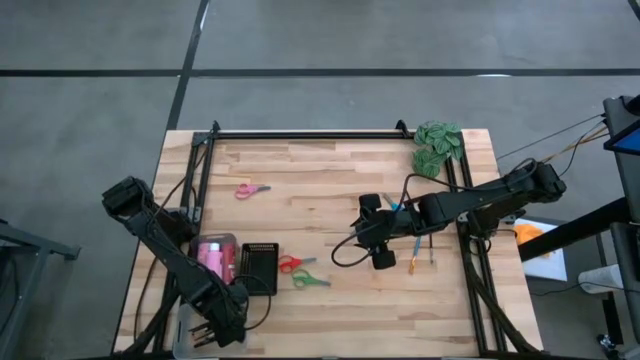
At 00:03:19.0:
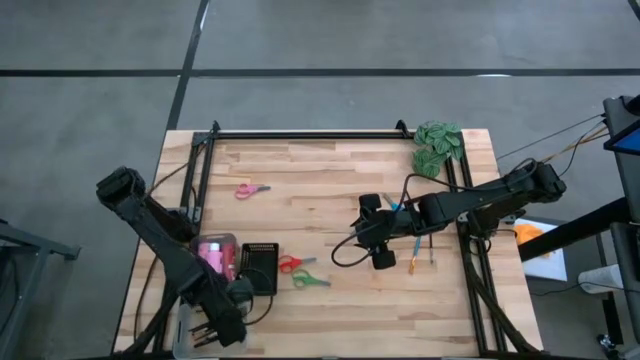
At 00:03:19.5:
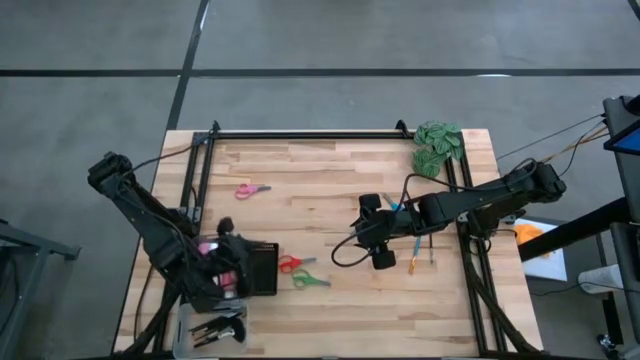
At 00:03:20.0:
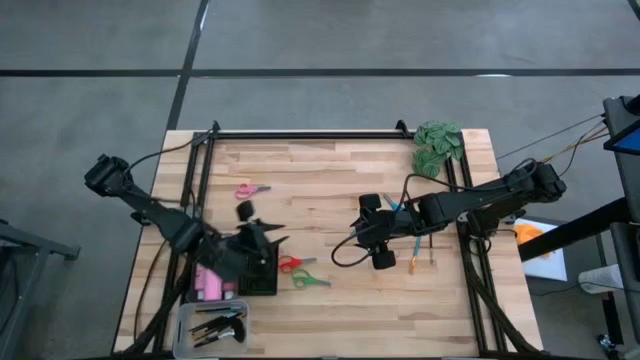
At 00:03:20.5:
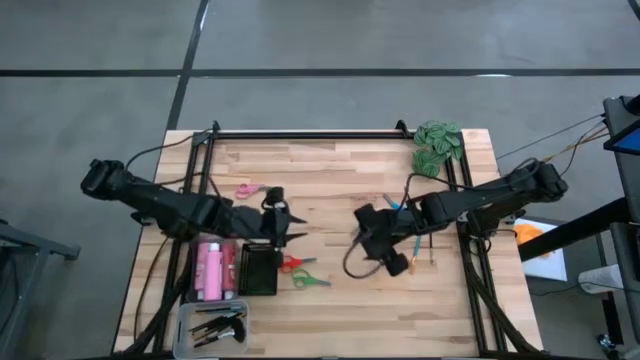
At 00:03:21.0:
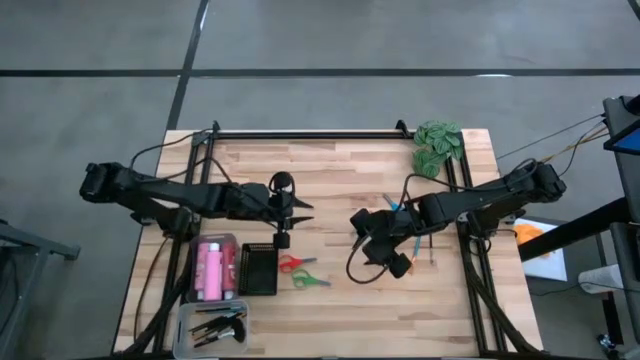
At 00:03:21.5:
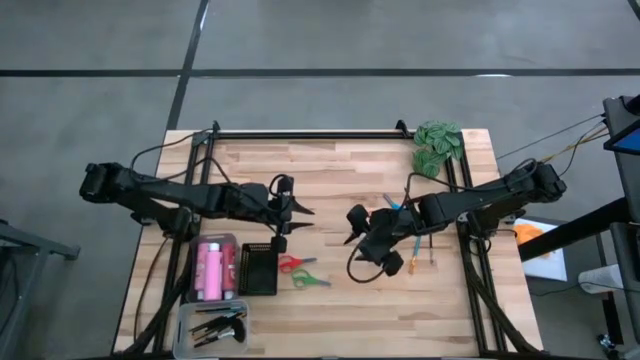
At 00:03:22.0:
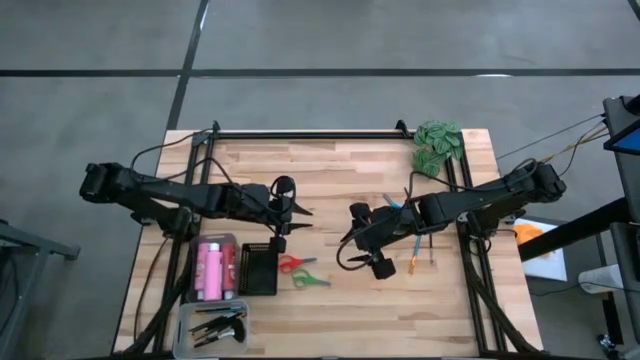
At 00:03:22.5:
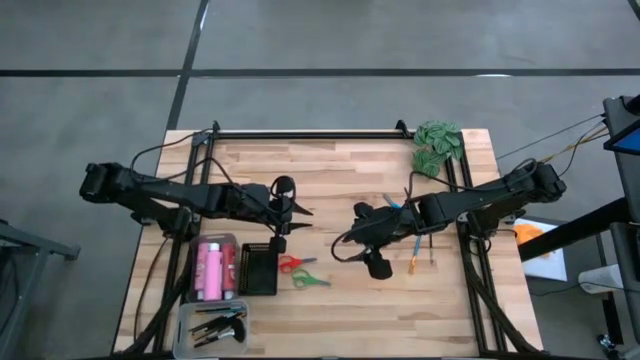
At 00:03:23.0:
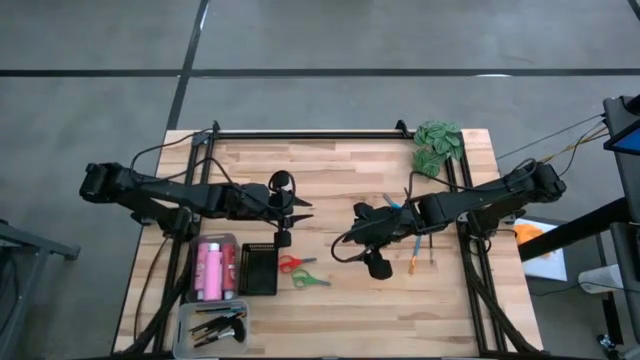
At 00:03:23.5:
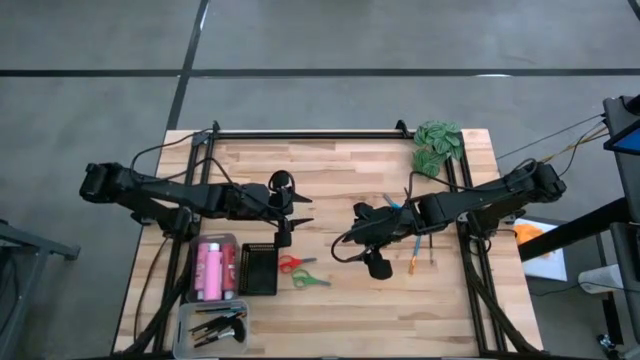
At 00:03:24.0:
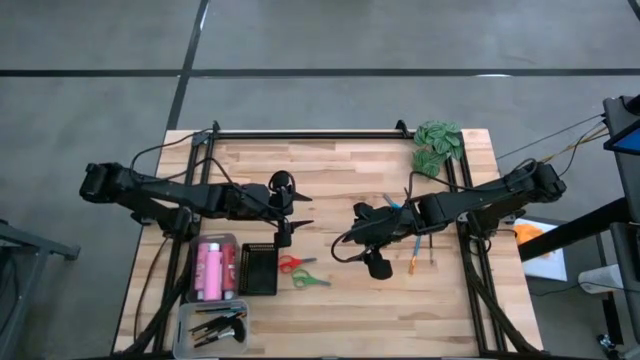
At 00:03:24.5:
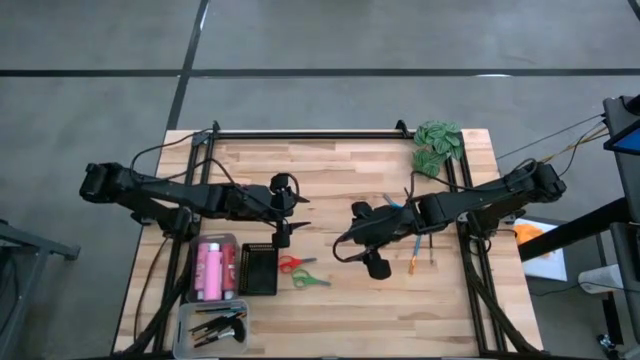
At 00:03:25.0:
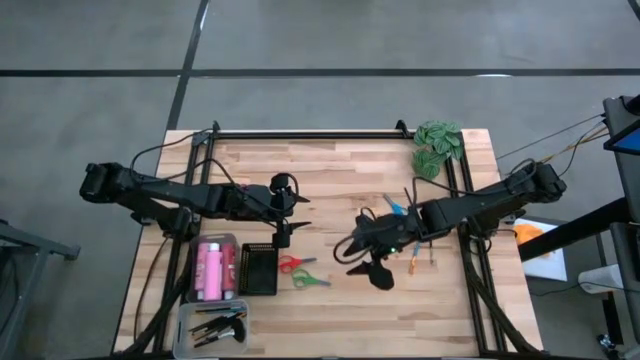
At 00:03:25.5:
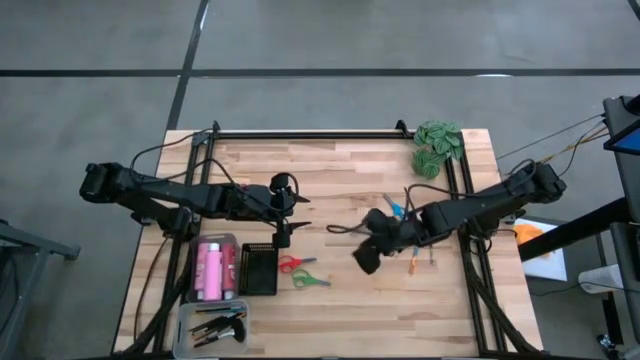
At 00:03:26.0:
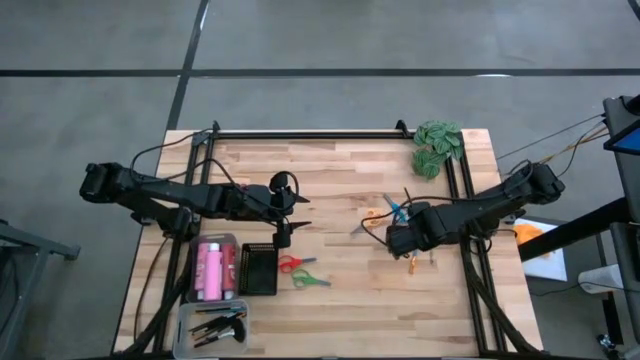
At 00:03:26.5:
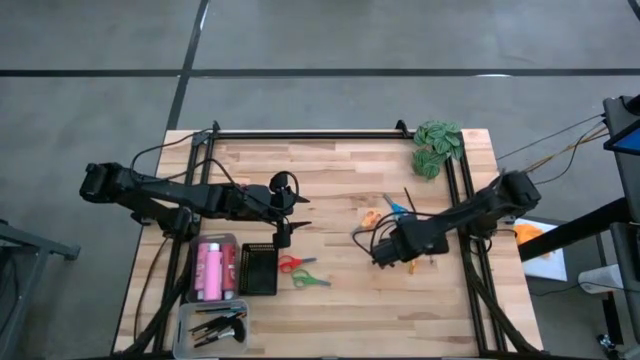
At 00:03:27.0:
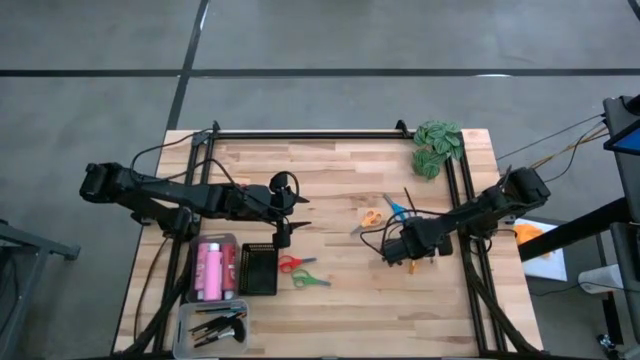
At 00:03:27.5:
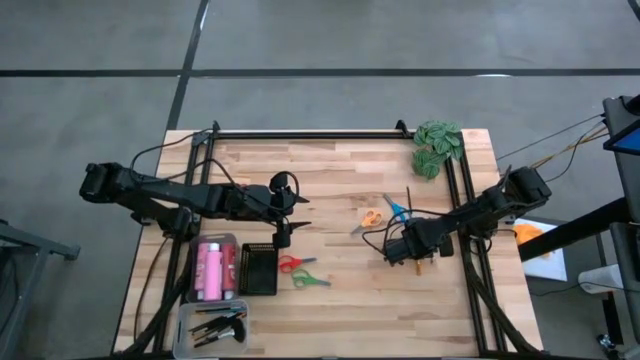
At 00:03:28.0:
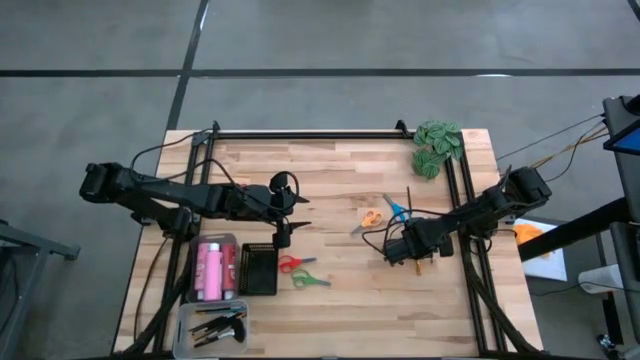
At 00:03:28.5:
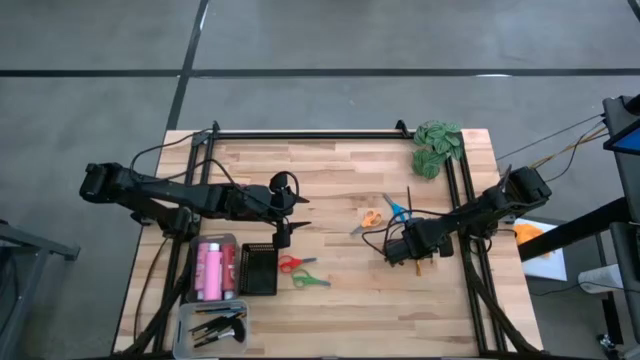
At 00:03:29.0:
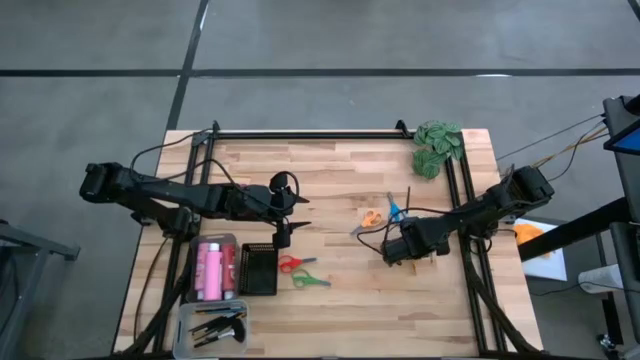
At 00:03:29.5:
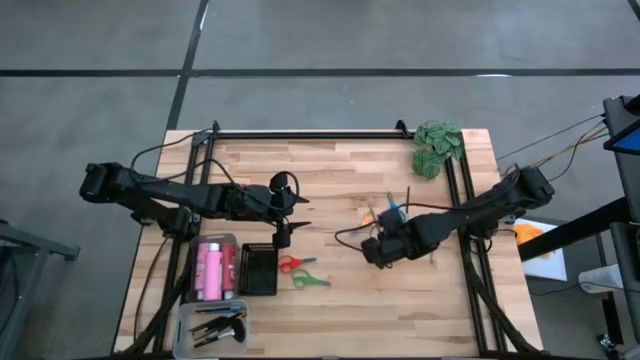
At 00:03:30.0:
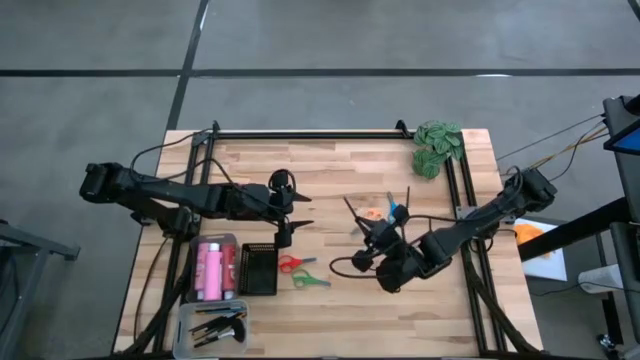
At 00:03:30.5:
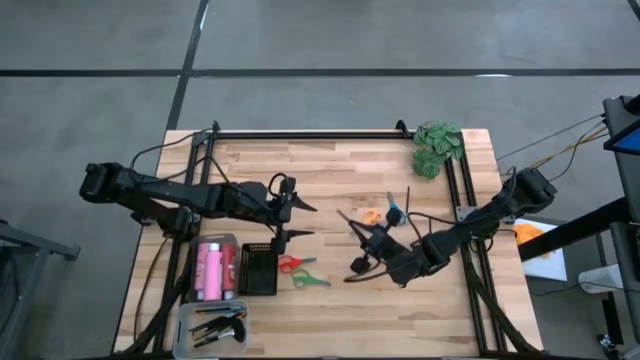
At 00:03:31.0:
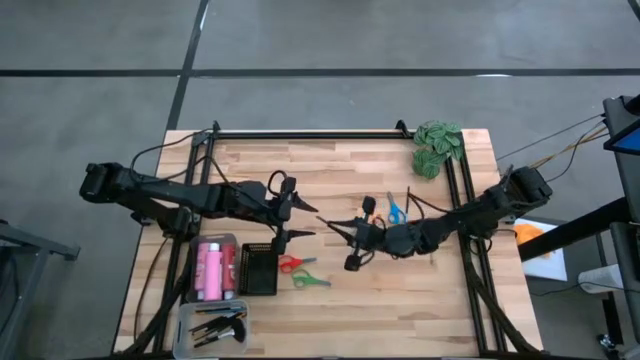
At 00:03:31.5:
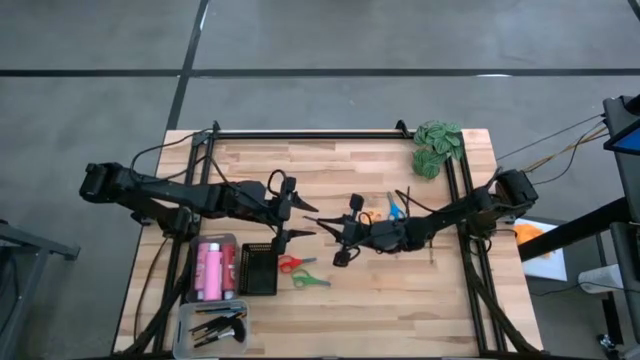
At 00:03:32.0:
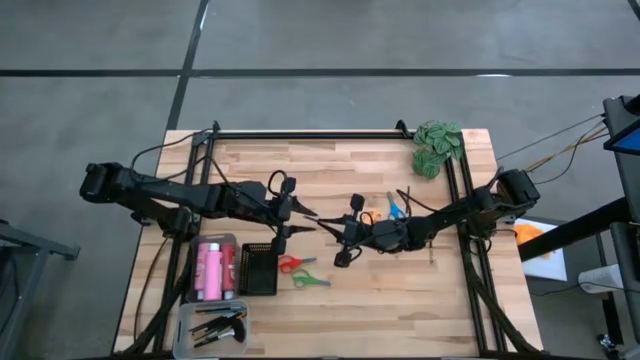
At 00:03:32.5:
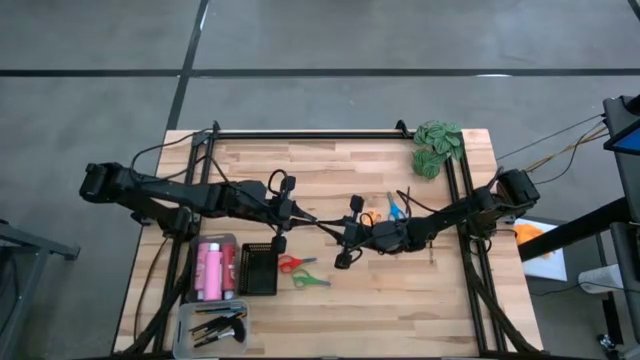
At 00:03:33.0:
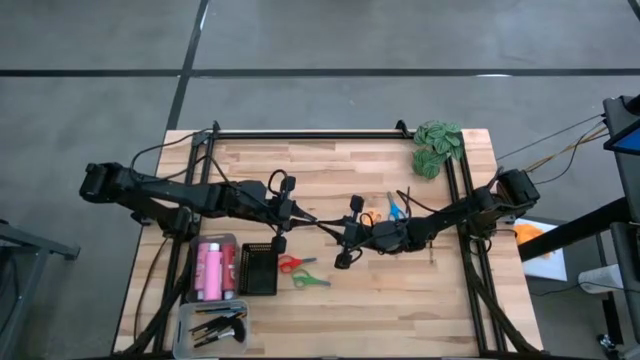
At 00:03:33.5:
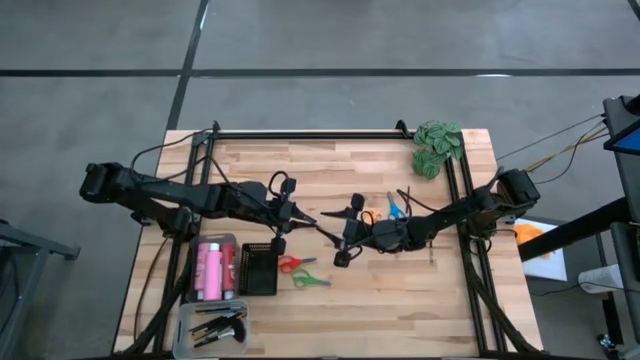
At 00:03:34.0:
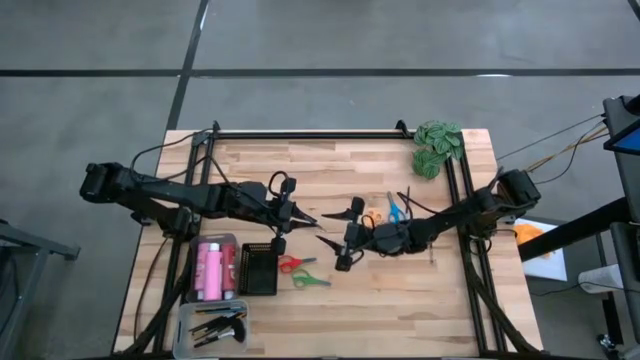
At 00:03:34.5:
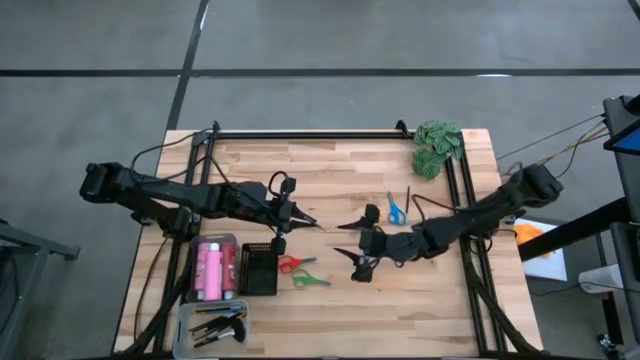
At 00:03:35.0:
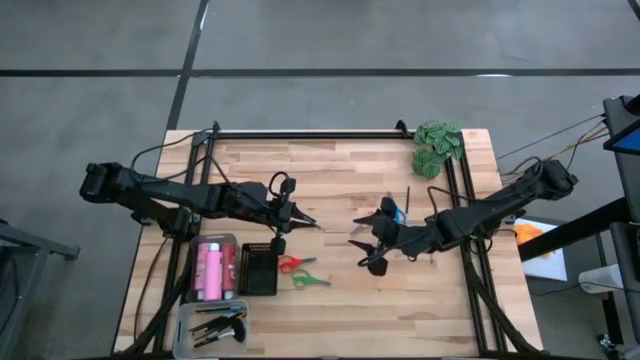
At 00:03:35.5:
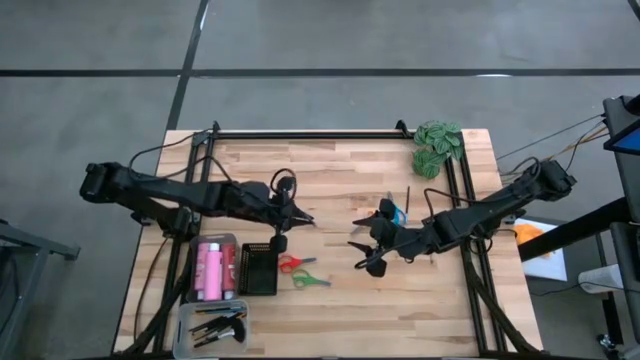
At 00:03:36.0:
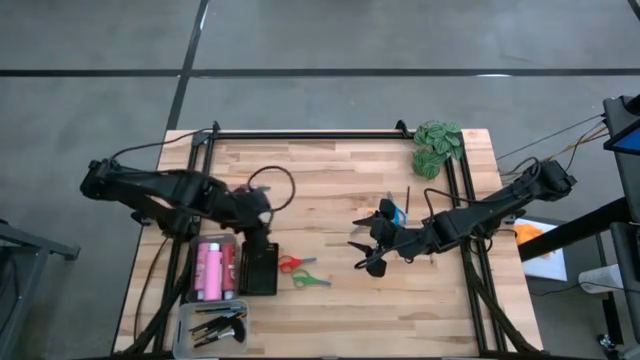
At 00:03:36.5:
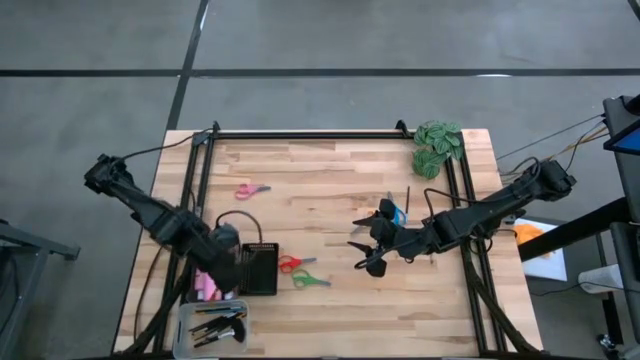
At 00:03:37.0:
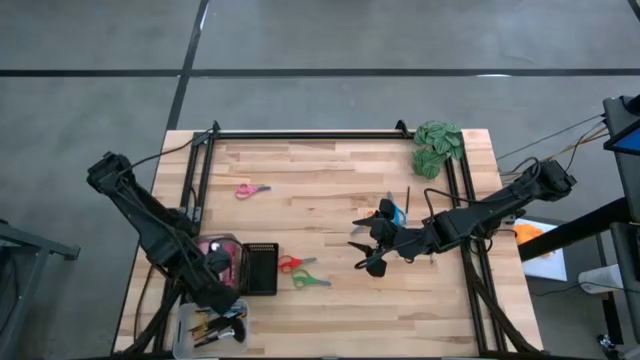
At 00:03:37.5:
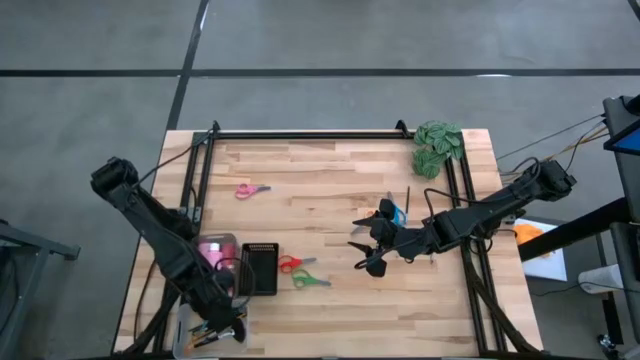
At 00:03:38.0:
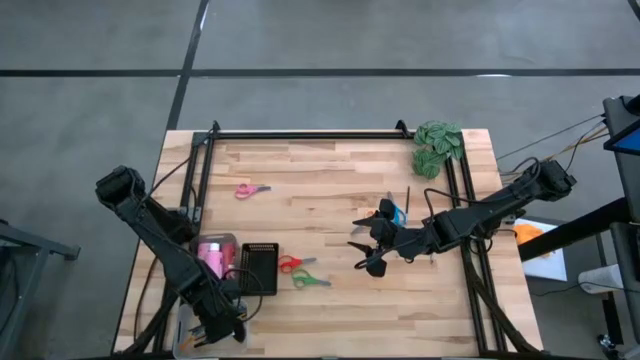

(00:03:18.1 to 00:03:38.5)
Task: Pick & Place Paint Supplies
Put the gold paint brush into the transparent bin

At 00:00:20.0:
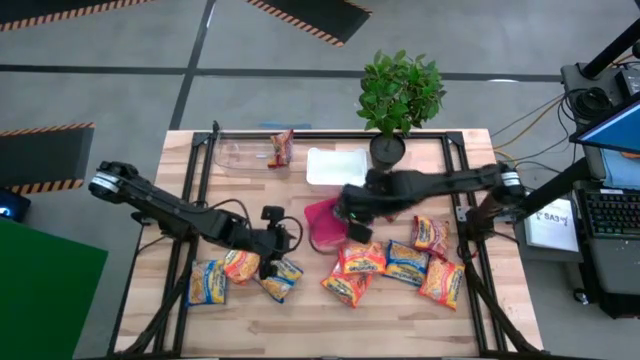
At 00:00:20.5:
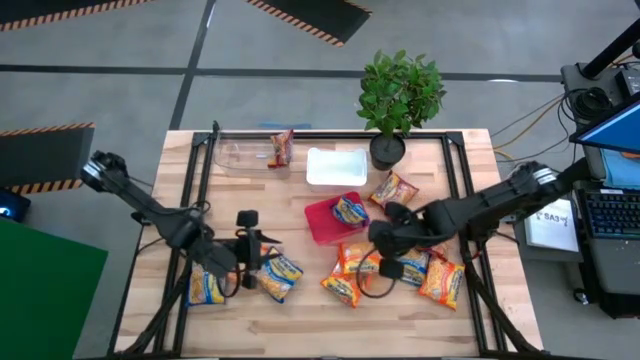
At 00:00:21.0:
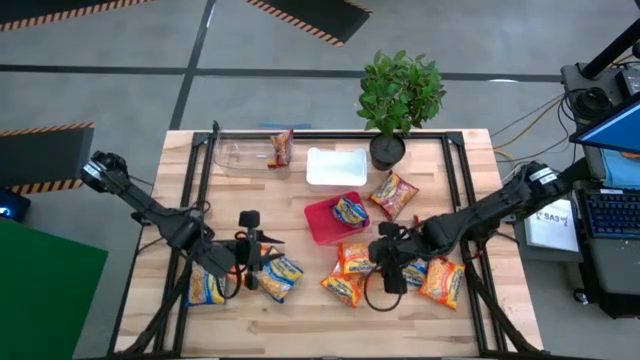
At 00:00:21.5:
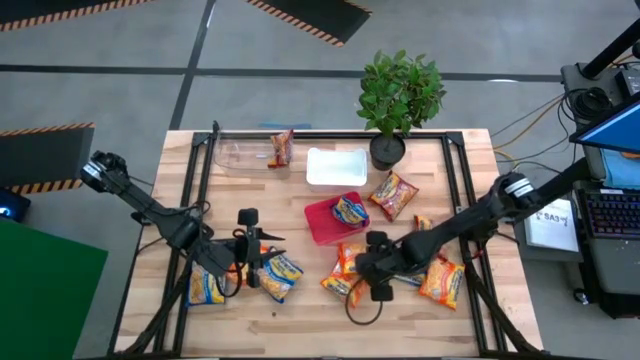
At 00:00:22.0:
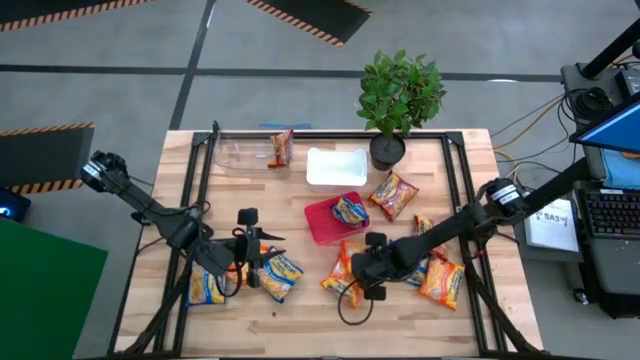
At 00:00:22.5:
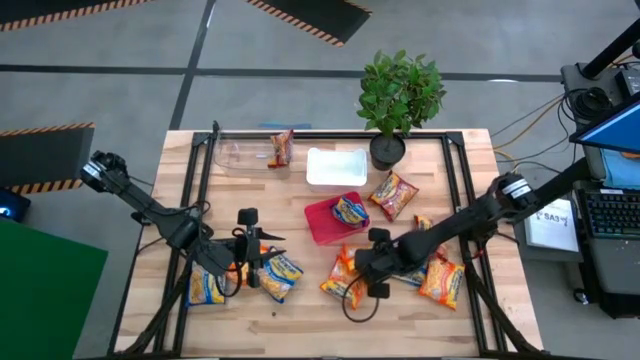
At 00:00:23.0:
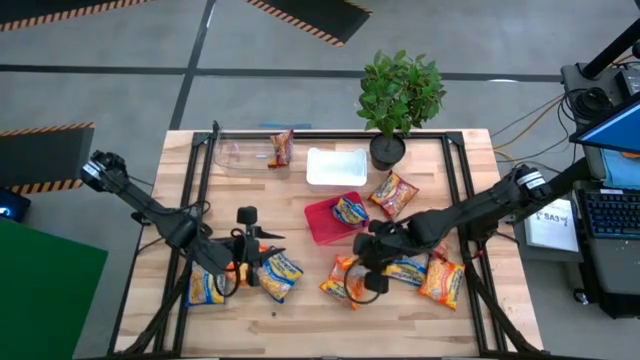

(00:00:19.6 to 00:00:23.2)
Task: Sort Maruchan noodles
Put the orange noodle pack into the white bin
